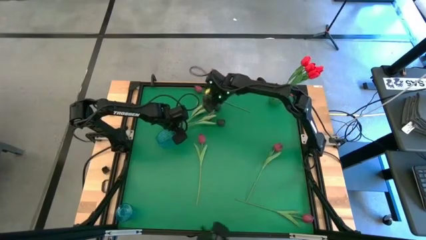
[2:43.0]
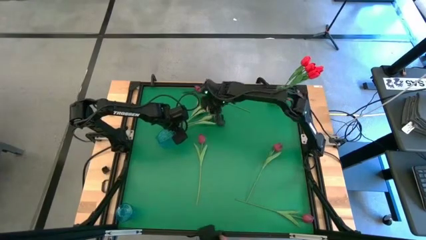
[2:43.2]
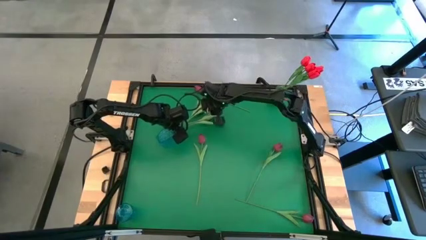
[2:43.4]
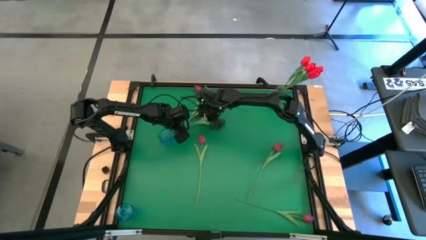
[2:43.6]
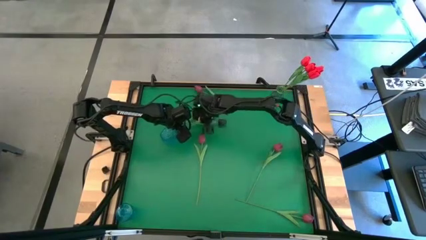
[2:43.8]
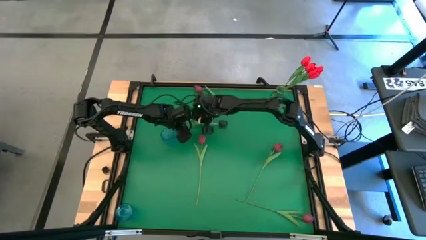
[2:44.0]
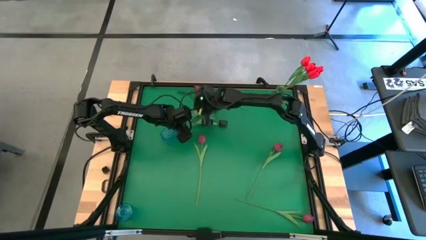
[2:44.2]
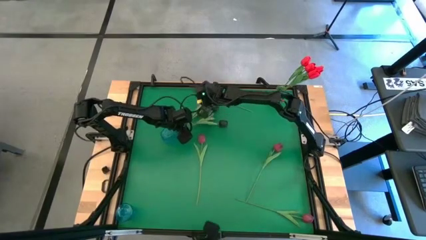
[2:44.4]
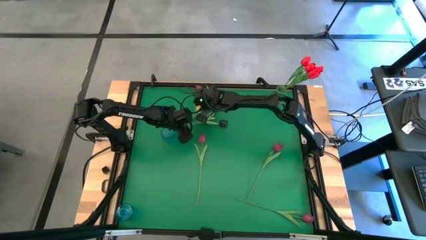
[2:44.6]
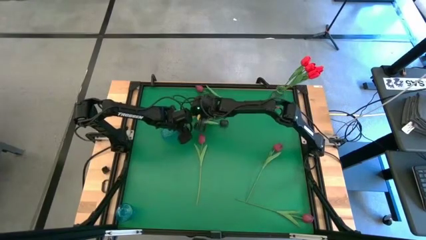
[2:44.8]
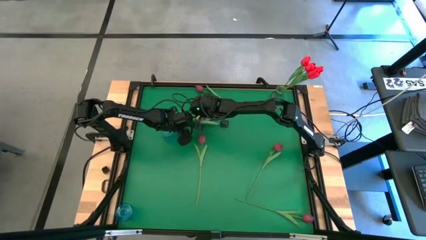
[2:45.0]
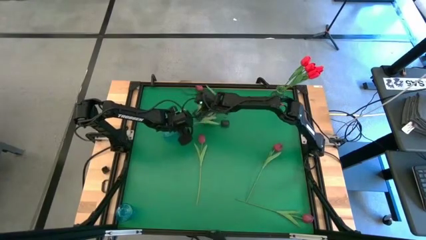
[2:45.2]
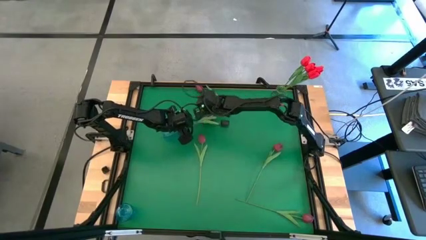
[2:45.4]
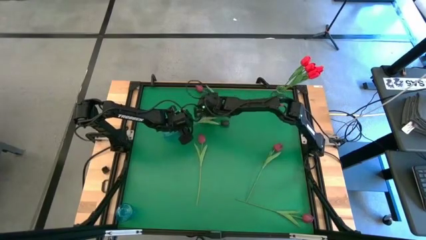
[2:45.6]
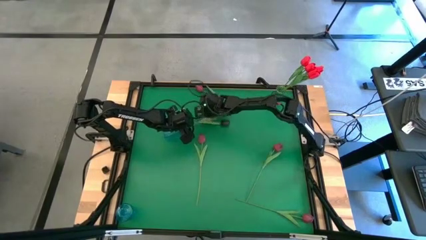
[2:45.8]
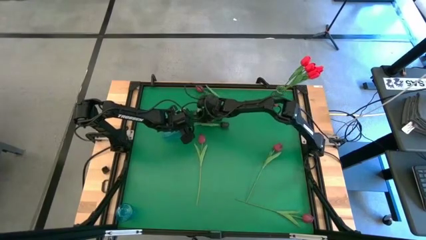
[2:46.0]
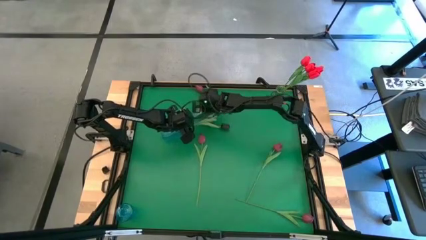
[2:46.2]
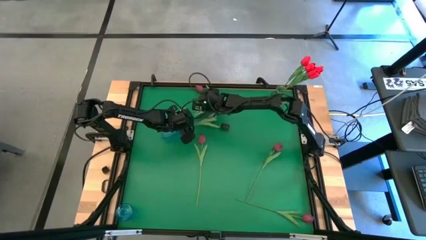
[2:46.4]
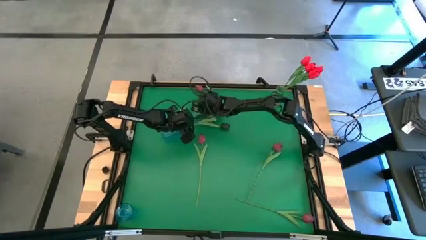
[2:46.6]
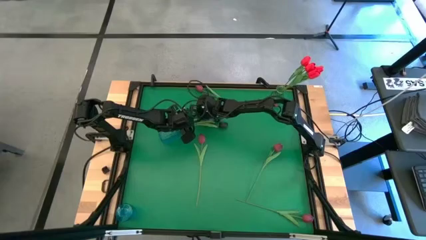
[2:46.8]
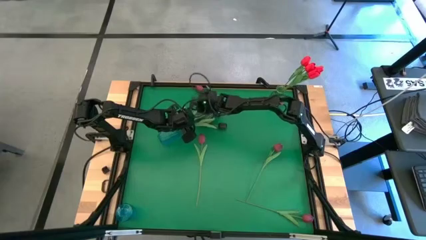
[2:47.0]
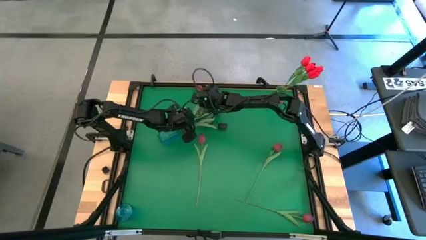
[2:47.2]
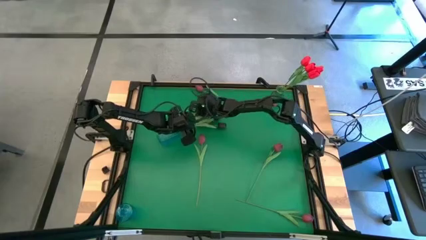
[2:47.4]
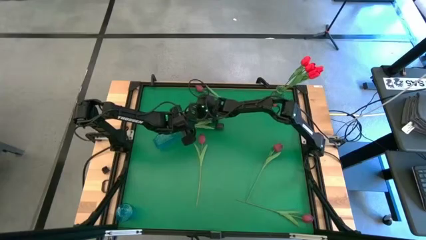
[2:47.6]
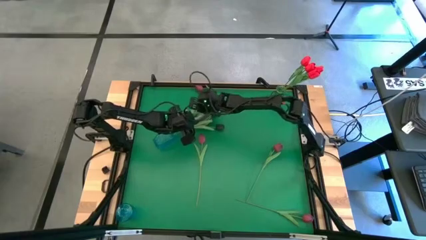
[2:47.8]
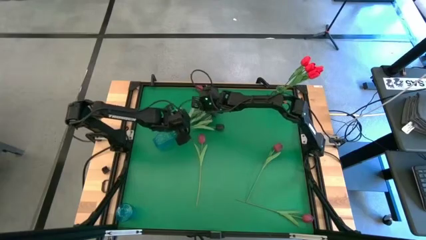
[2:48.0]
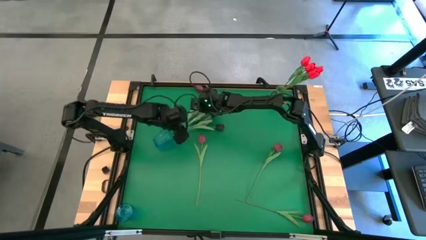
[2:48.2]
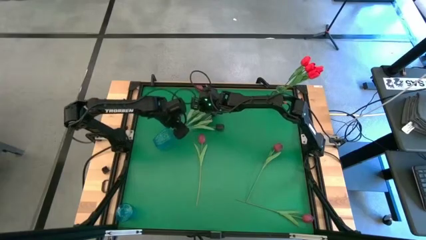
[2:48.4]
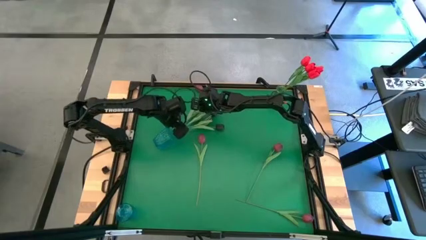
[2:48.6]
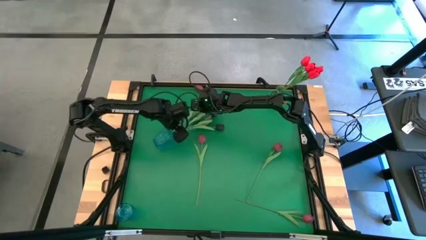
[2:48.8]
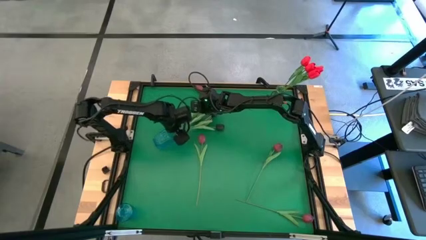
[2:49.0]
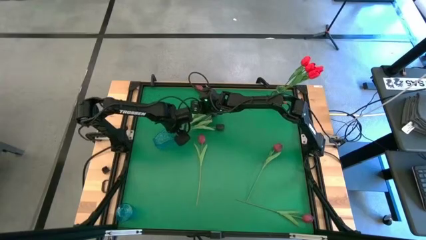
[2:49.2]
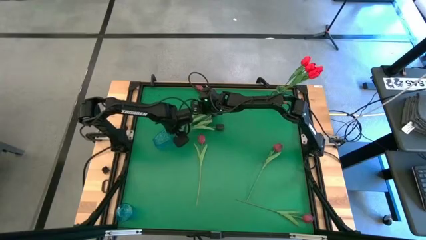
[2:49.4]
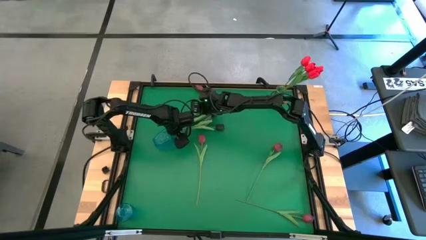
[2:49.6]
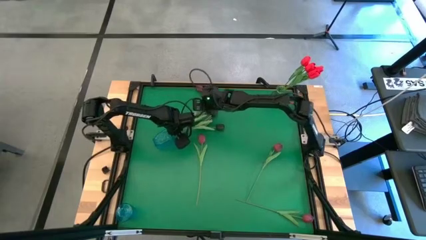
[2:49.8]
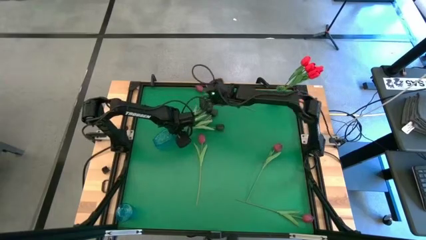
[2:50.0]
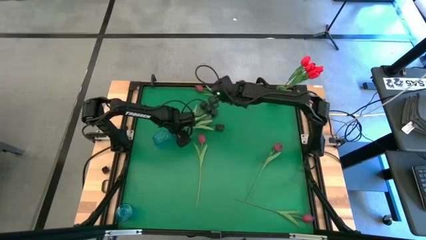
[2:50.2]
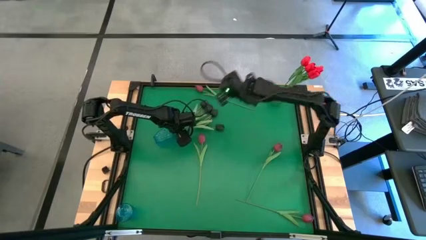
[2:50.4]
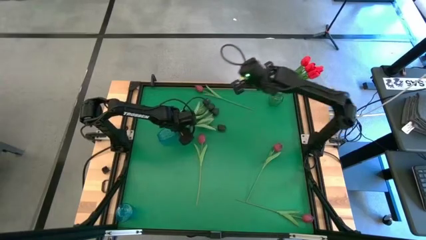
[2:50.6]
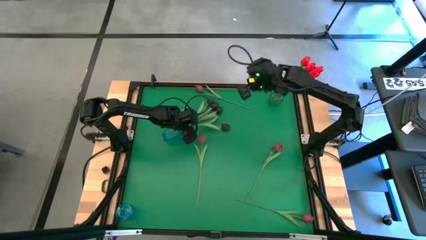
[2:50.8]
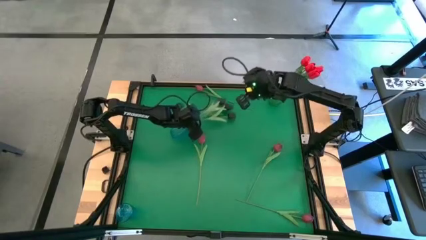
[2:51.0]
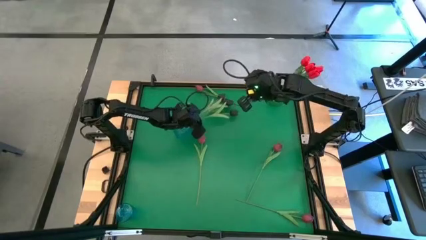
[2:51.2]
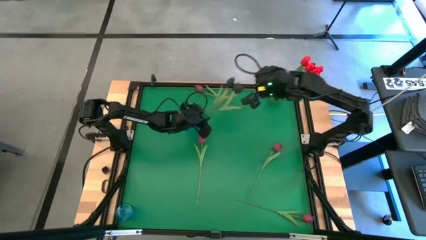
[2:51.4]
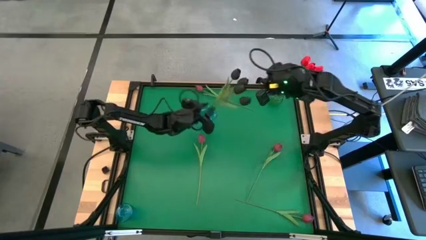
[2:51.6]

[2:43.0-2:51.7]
Task: Sort flowers into vase by color
Adjust the top blue vase

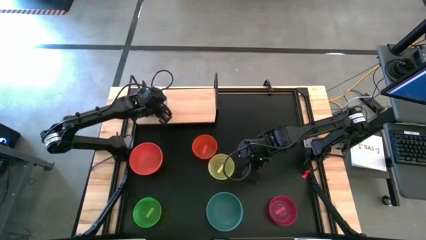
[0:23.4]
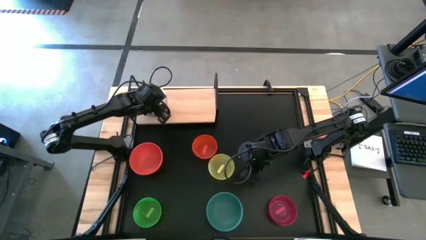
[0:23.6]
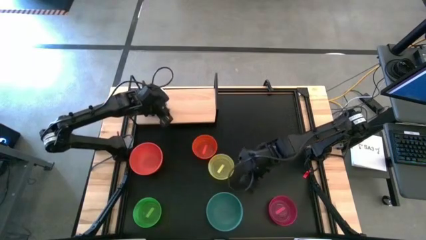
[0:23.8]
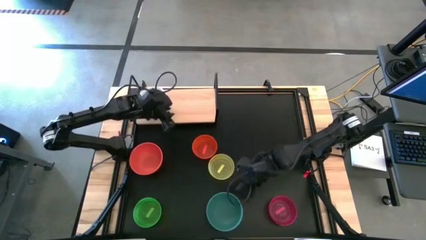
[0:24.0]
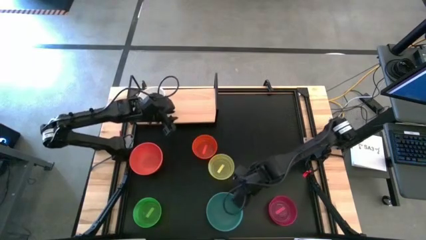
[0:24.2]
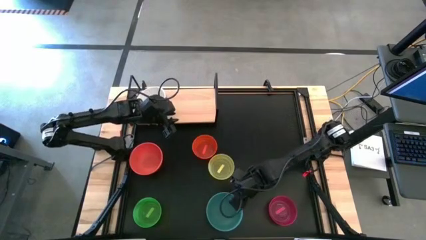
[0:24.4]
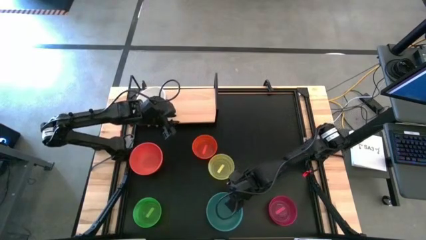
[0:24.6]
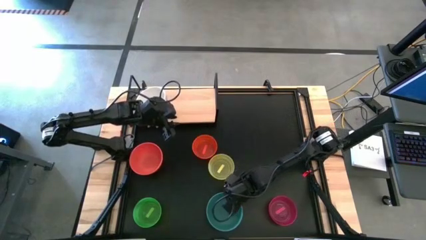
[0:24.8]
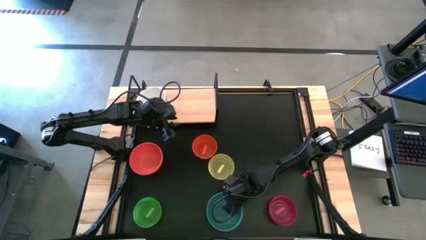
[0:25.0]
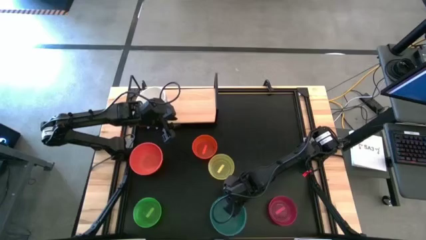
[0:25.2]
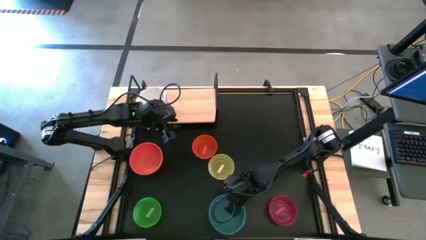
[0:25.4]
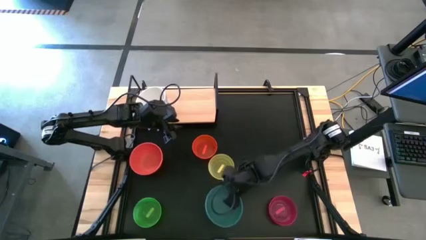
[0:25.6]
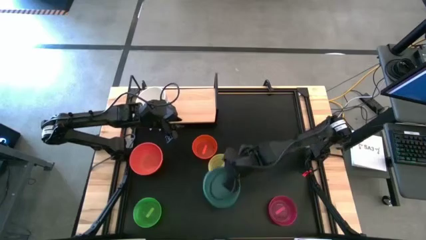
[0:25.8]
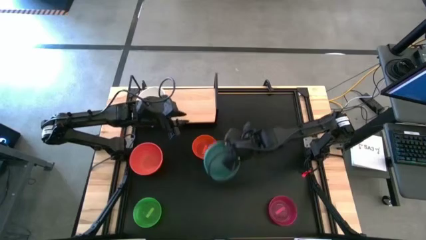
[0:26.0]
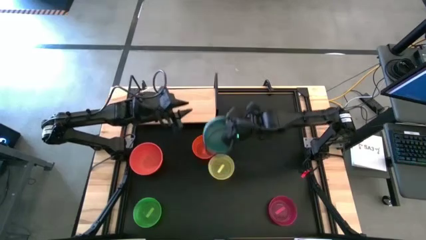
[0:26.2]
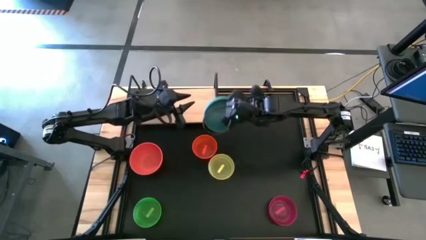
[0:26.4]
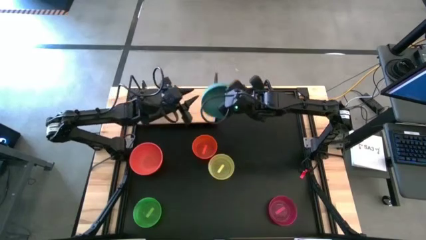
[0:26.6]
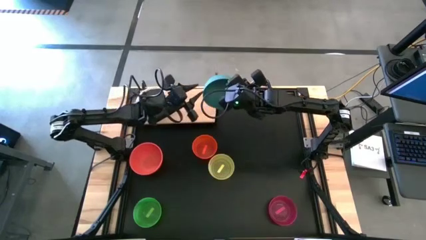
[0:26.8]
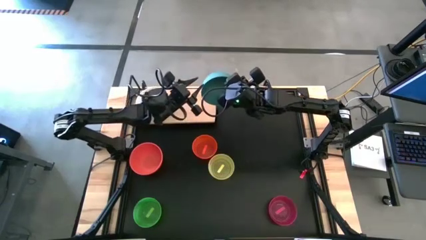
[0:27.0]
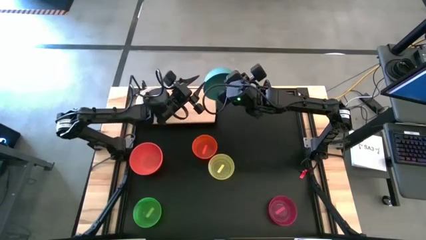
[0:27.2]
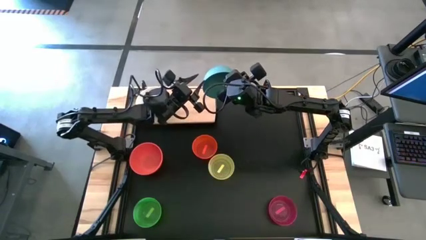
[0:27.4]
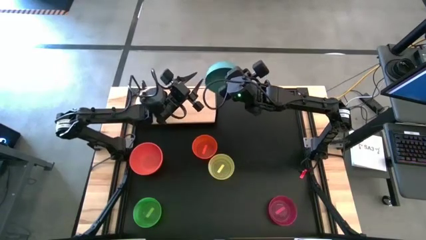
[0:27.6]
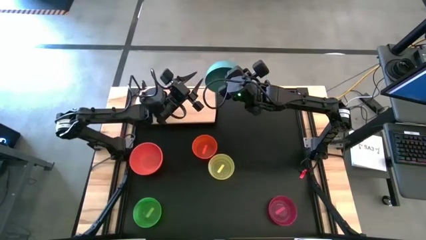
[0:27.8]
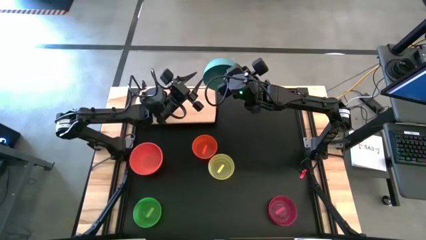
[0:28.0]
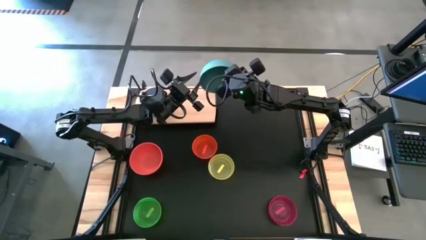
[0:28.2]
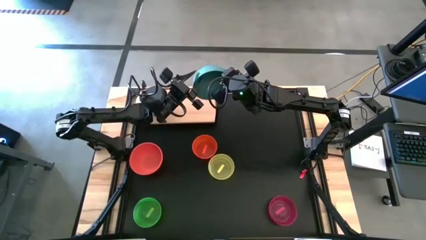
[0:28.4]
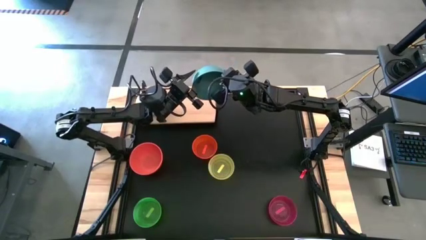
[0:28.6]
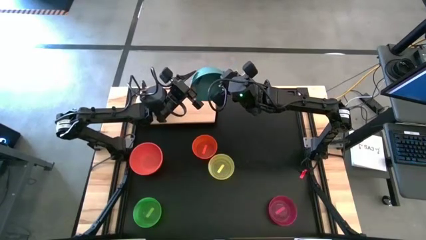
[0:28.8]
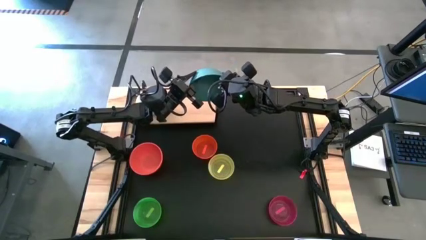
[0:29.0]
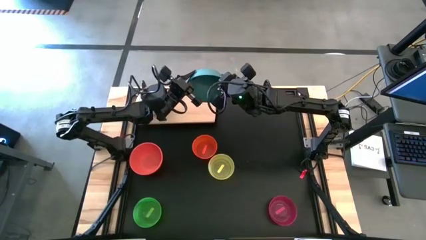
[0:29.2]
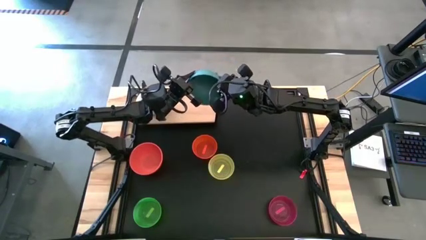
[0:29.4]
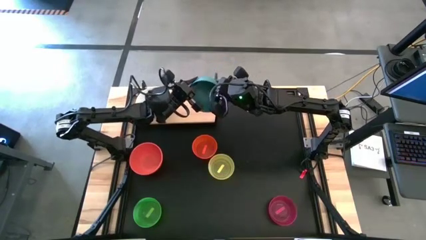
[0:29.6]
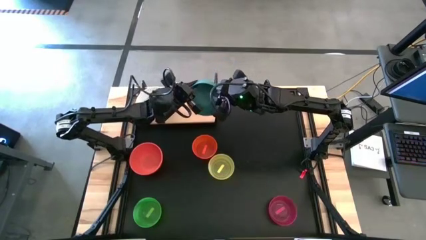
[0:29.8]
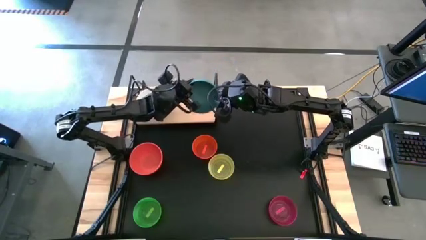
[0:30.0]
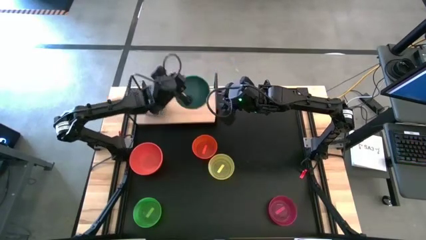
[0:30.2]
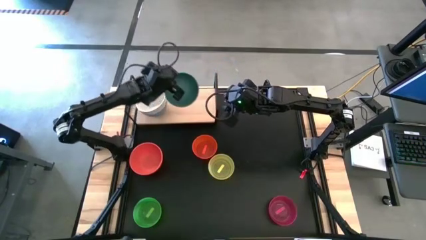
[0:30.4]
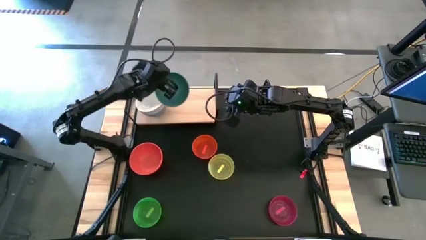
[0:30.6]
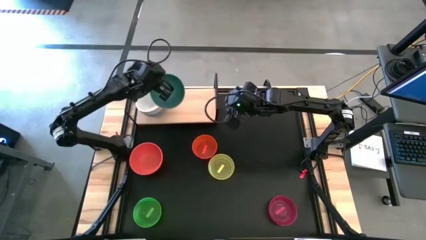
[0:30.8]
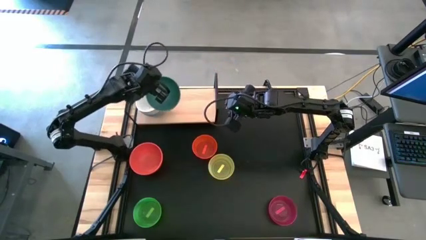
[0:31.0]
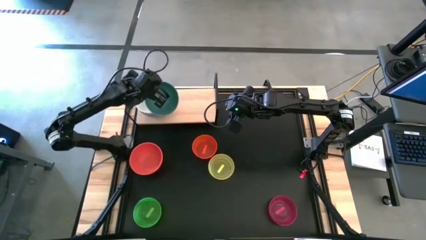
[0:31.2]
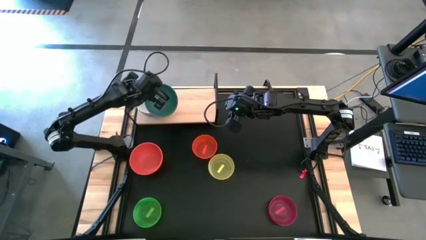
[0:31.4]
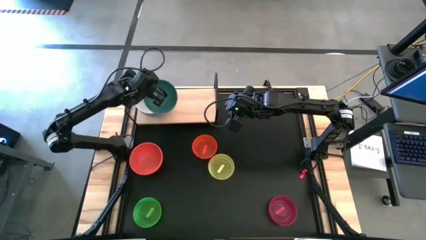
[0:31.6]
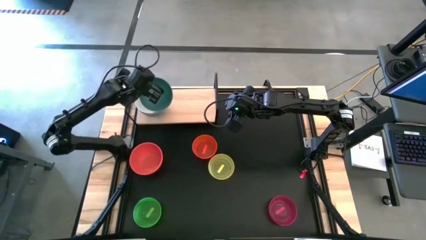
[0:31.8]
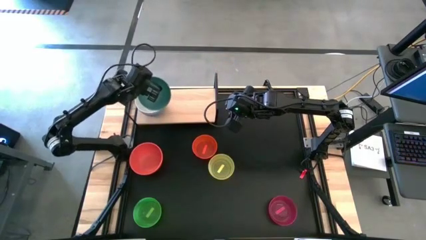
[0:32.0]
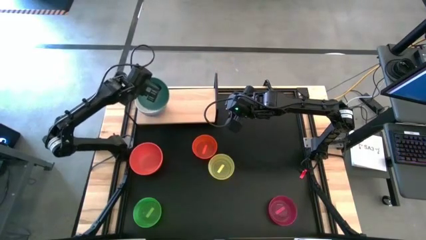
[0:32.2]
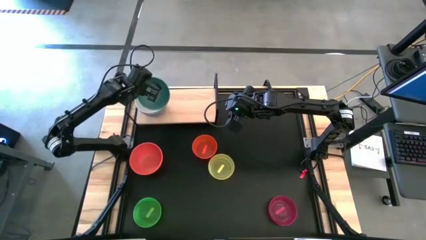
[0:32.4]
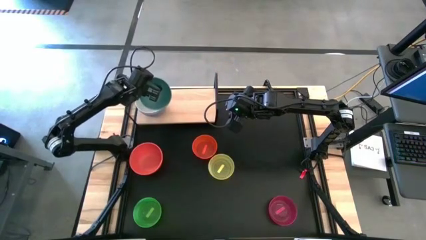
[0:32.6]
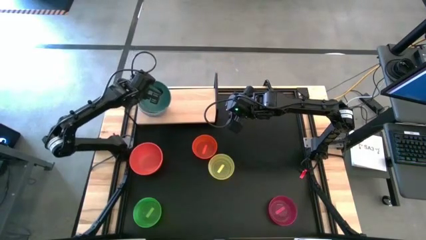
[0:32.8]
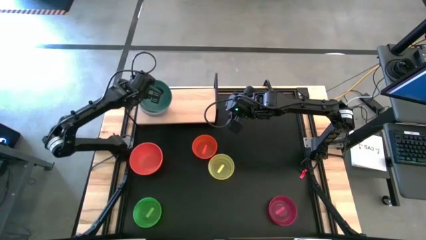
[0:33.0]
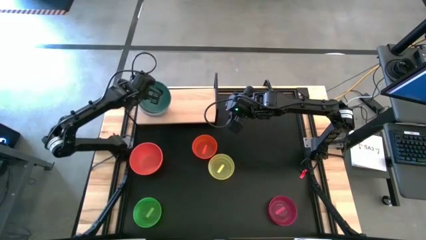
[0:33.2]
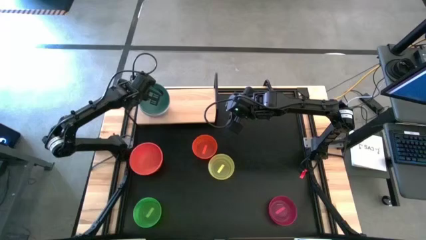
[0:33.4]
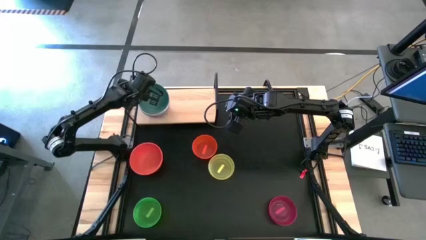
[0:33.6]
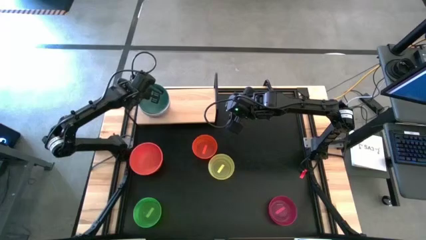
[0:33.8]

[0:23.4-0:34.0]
Task: Place and stack bowls onto a shelf
Stack the green bowl on top of the white bowl on the shelf
